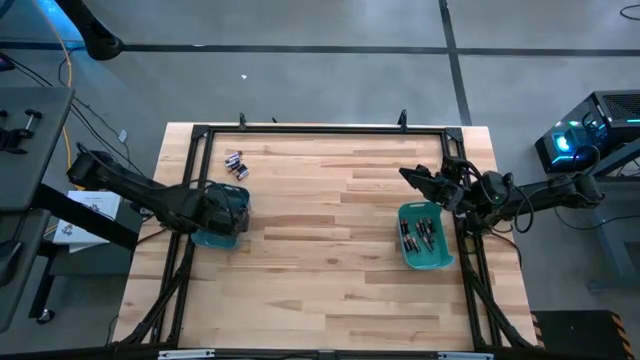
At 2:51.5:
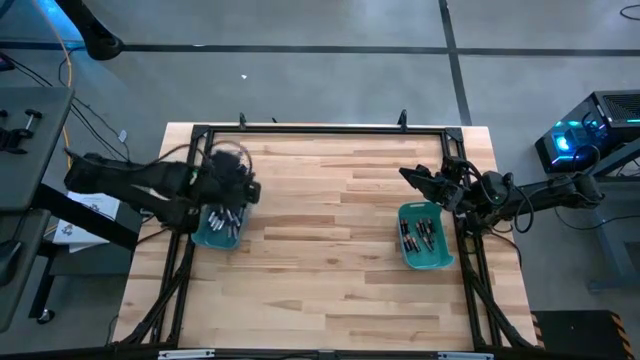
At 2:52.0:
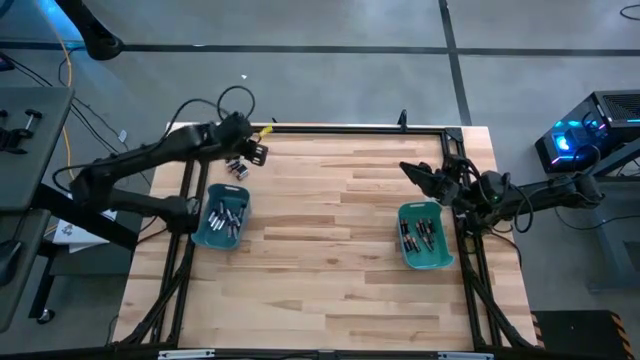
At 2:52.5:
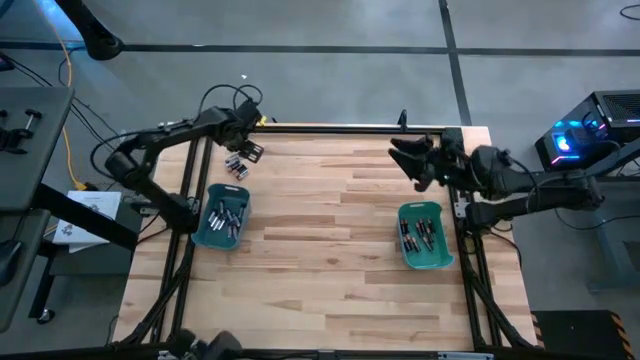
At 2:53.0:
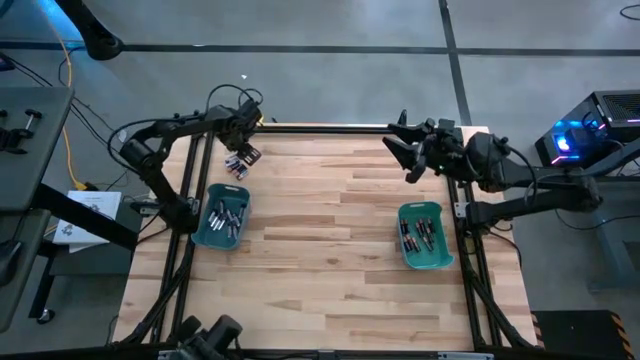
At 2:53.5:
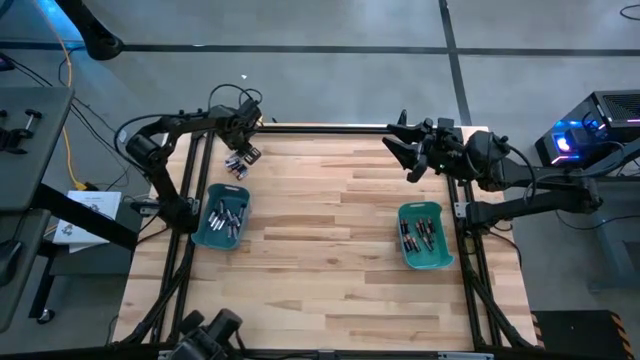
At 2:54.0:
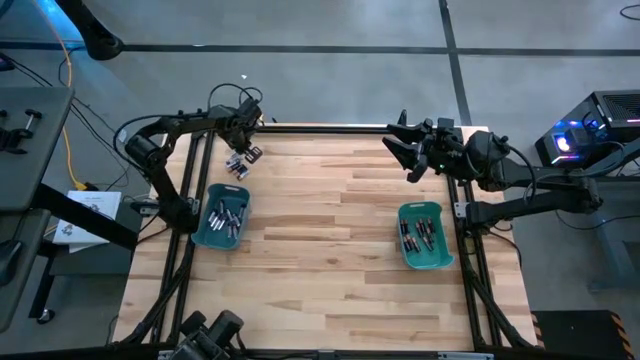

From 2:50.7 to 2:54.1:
Task: Sort batteries
Put the silver battery into the blue bin

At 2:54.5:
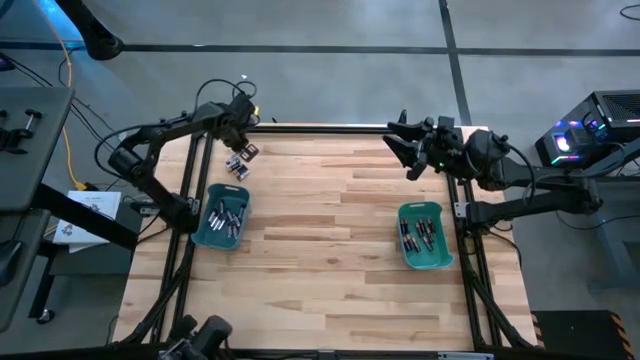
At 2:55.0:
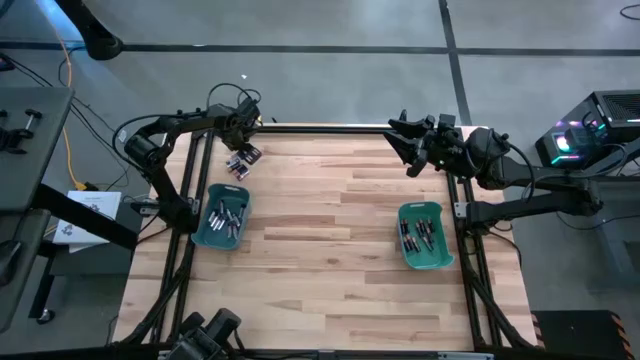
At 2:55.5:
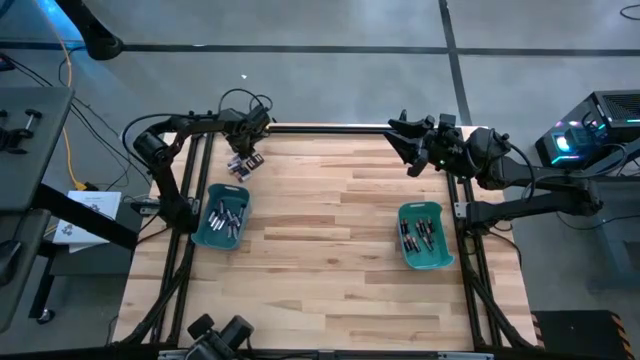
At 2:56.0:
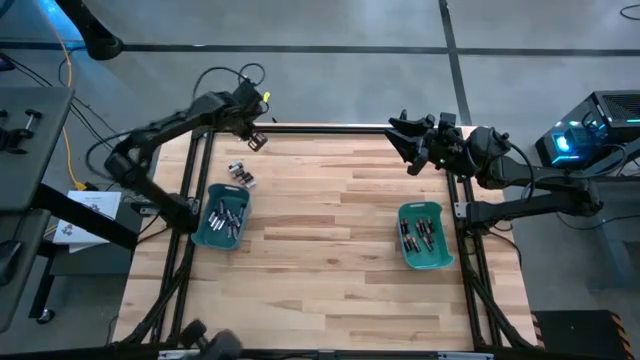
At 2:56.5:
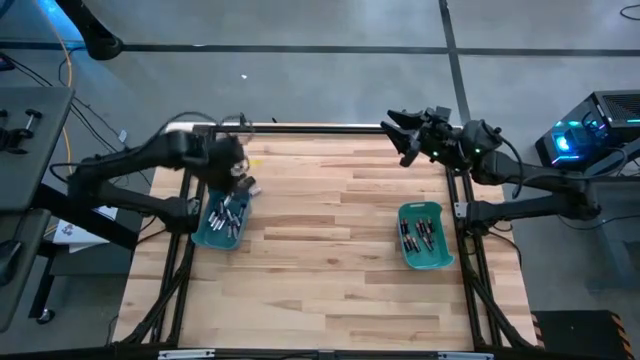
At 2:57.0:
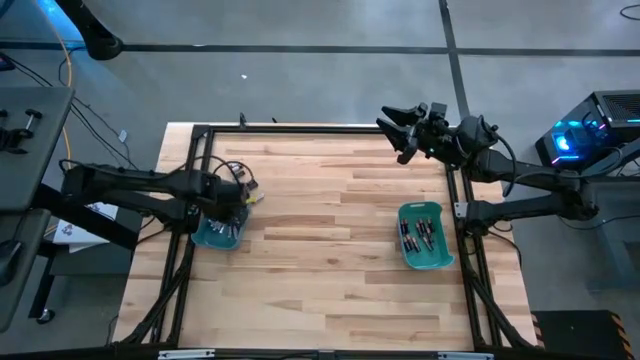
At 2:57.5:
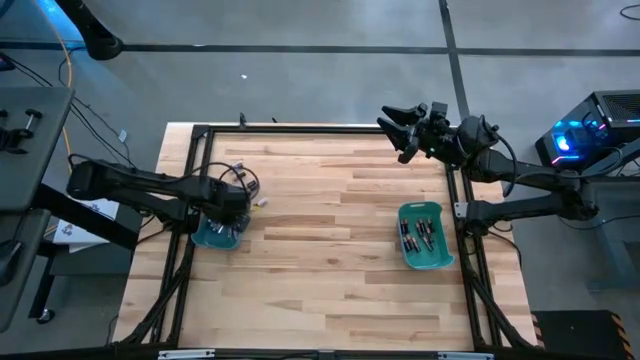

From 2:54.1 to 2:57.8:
Put the silver battery into the blue bin

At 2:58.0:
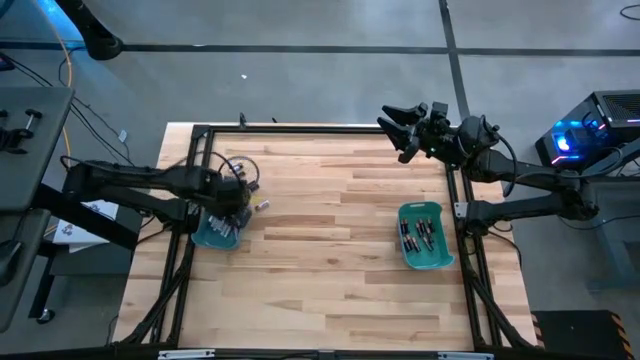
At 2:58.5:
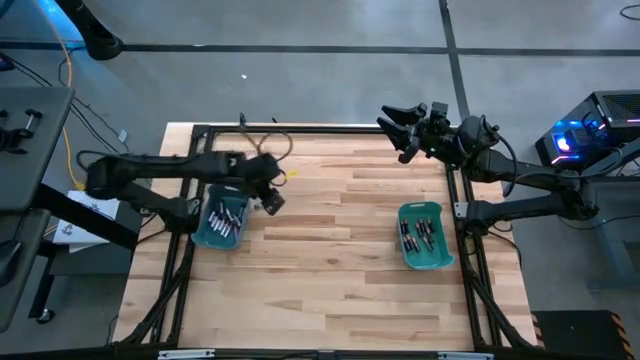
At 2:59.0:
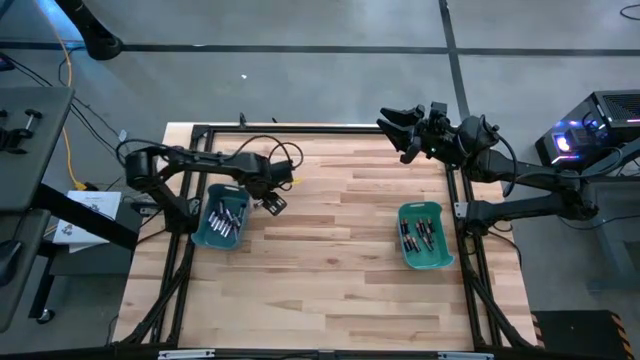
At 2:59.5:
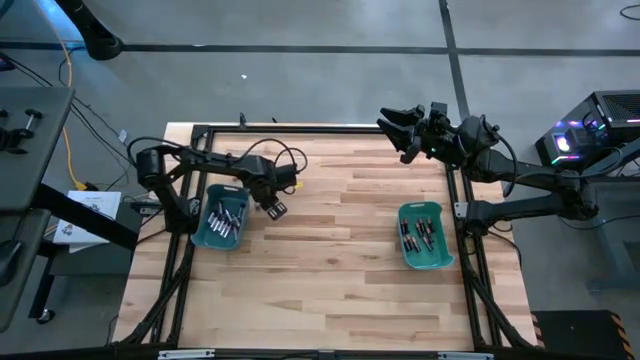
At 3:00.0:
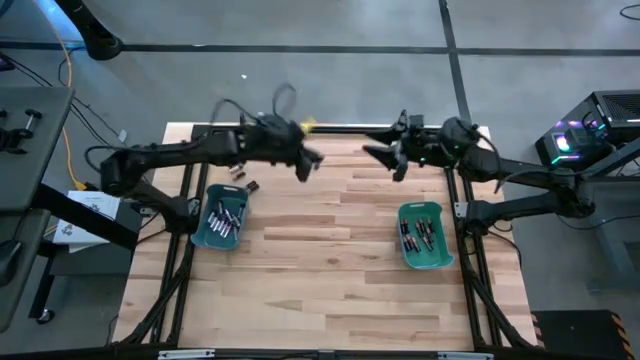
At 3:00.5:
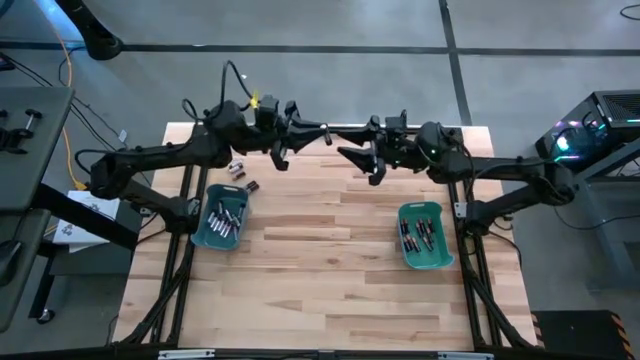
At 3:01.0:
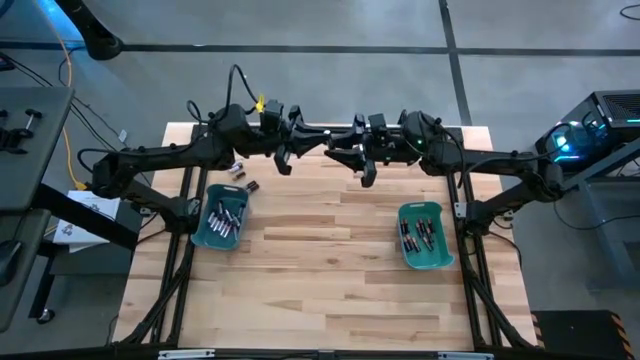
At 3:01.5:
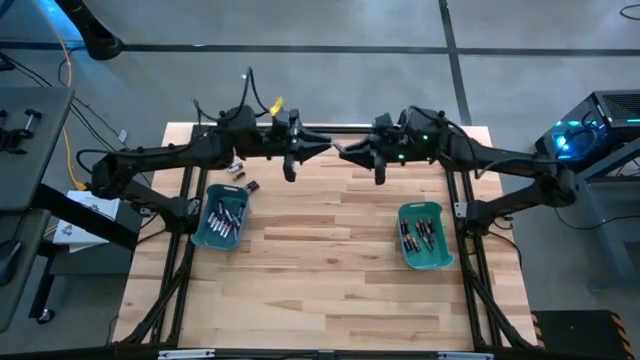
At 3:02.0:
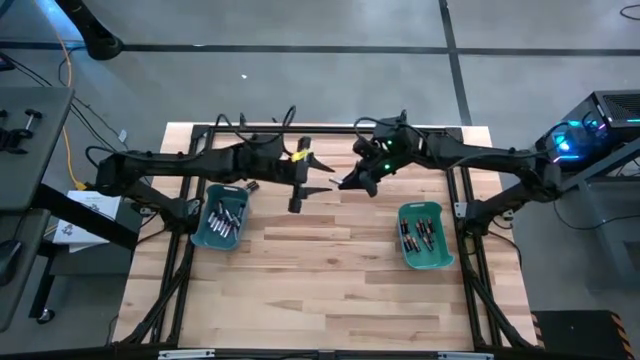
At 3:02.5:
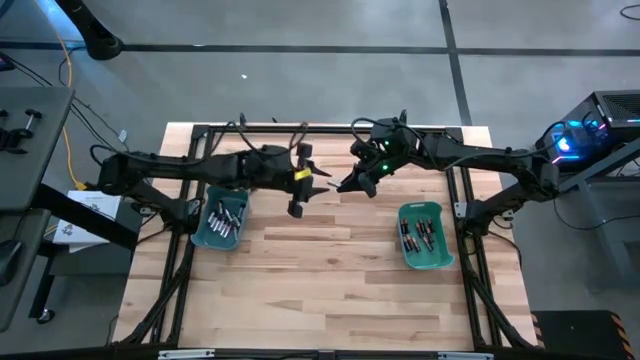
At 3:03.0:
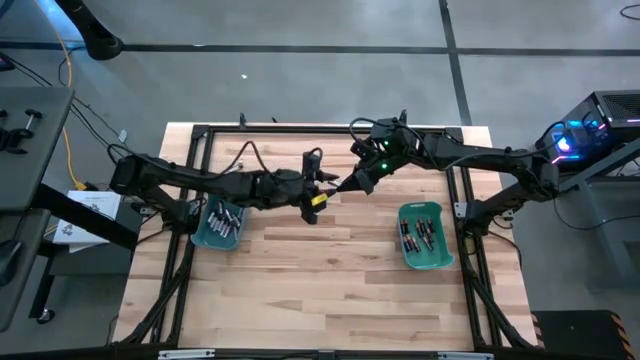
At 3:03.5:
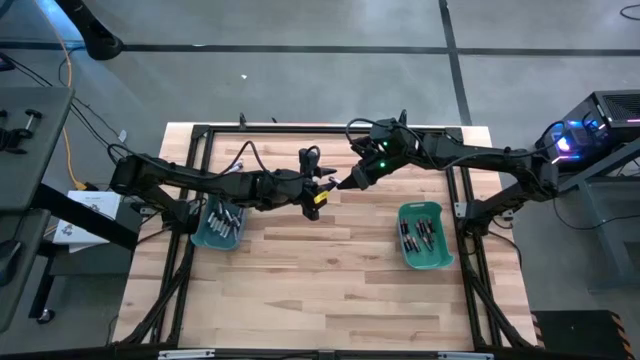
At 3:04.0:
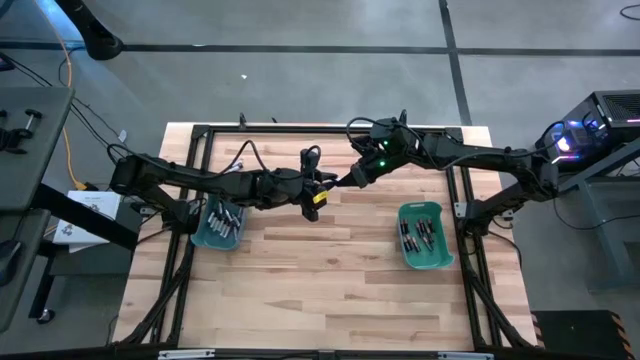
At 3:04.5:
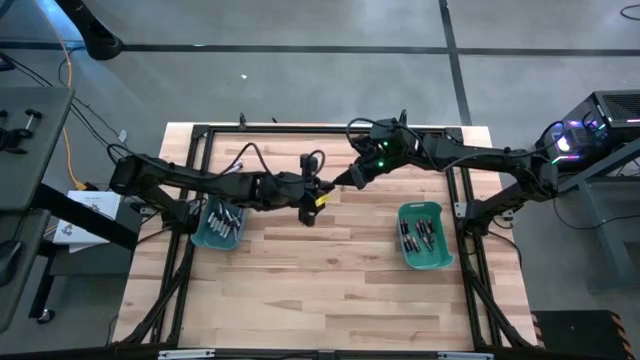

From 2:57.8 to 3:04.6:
Put the silver battery into the blue bin

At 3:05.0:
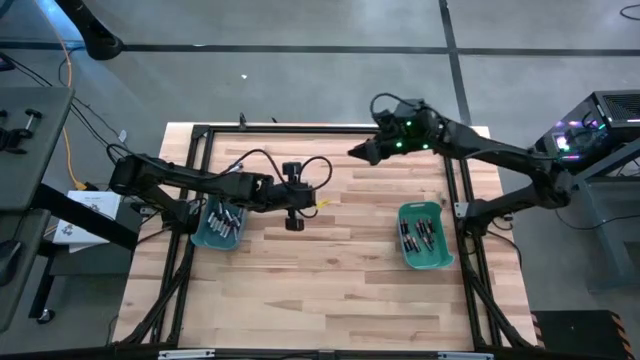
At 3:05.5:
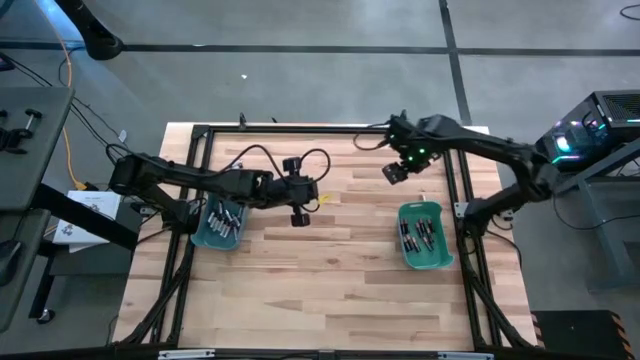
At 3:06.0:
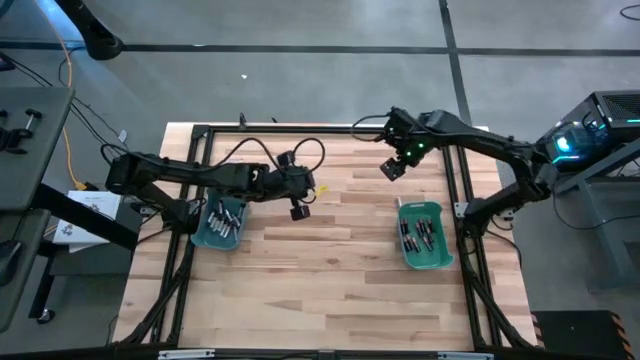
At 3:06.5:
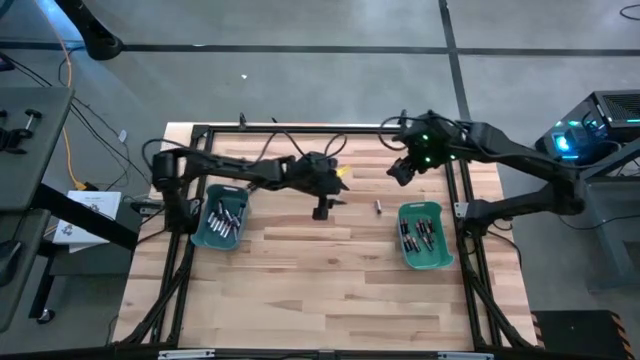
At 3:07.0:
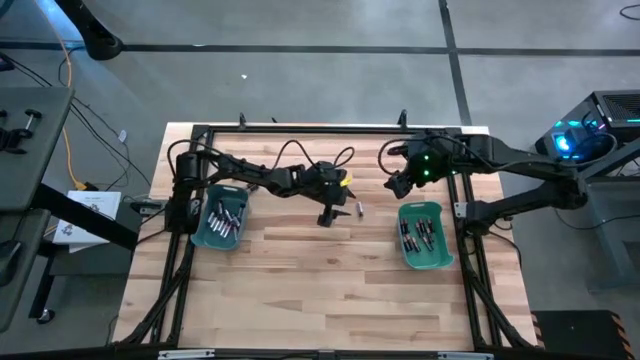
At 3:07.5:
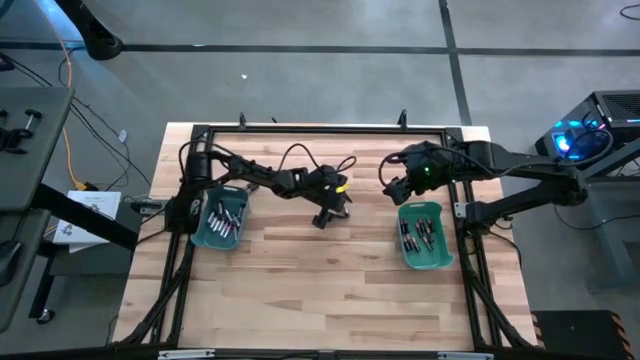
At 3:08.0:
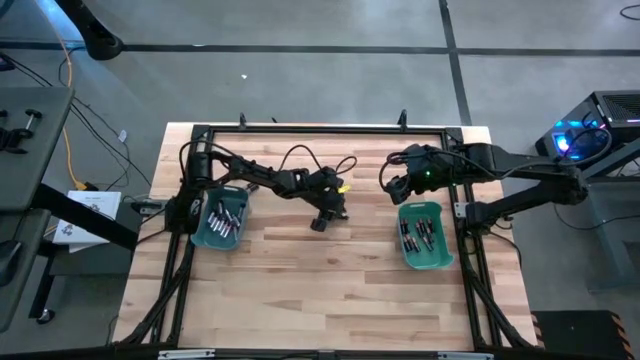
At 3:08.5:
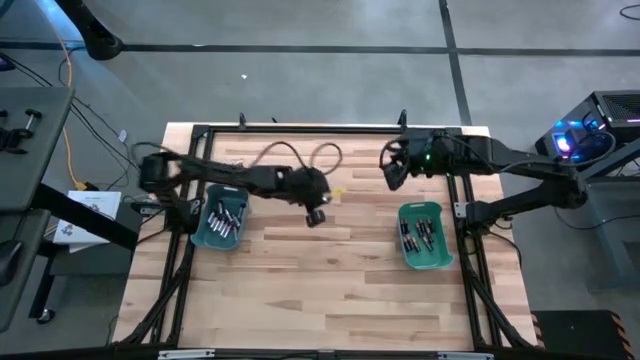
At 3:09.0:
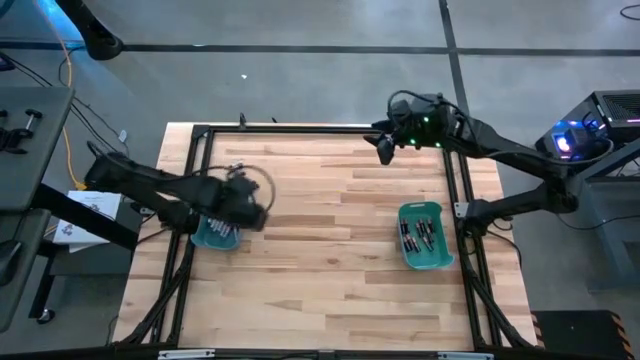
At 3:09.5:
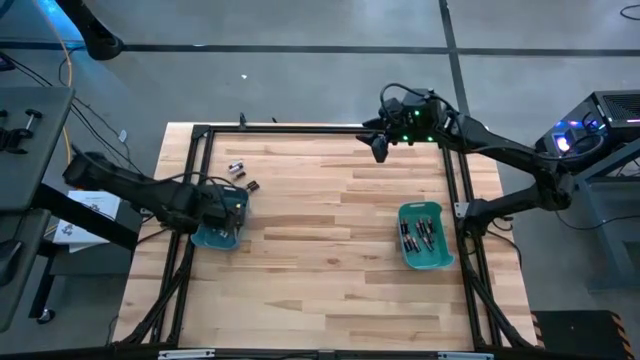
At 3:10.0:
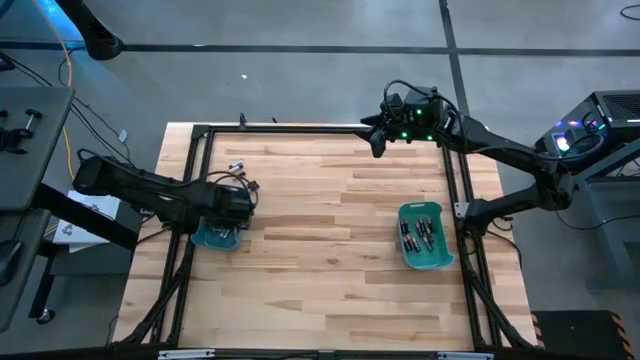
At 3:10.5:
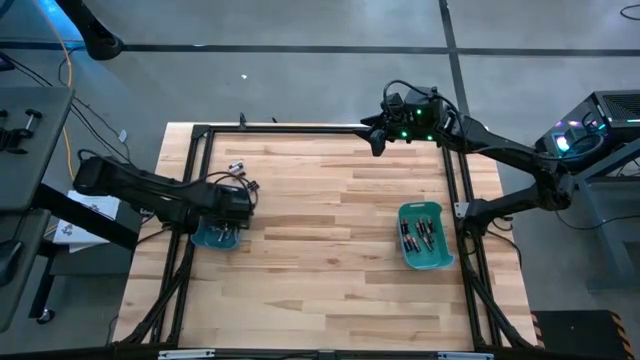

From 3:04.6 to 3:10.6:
Put the silver battery into the blue bin

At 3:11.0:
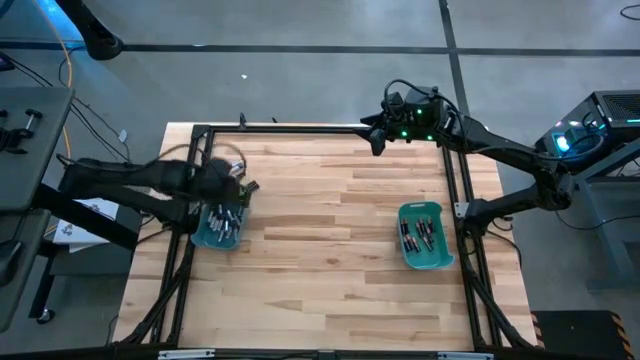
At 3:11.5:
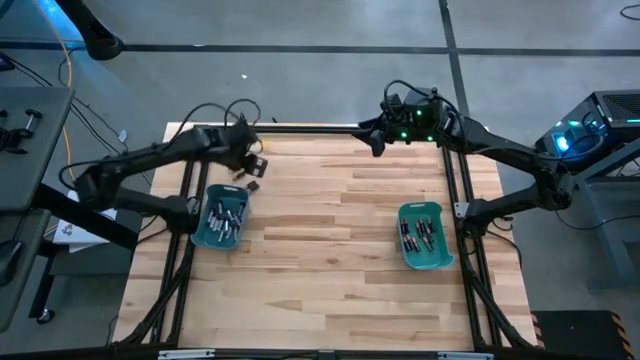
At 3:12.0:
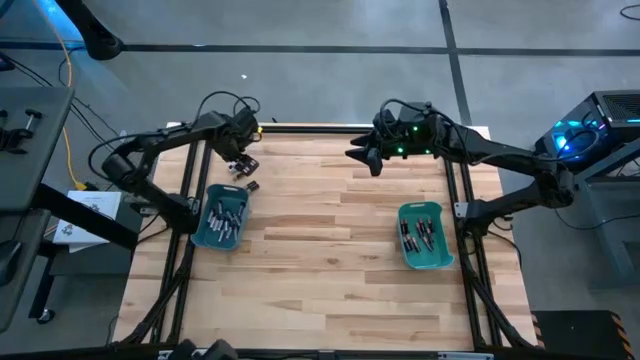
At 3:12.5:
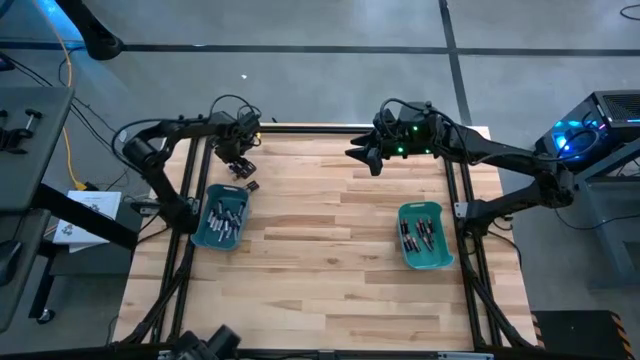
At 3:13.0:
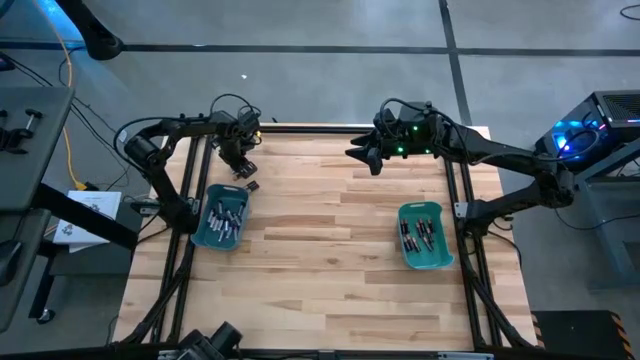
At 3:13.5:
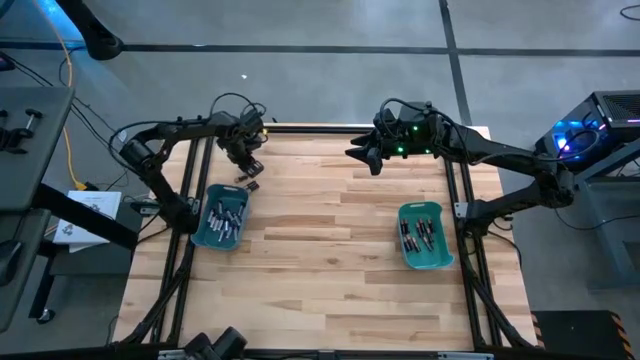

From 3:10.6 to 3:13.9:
Put the silver battery into the blue bin
